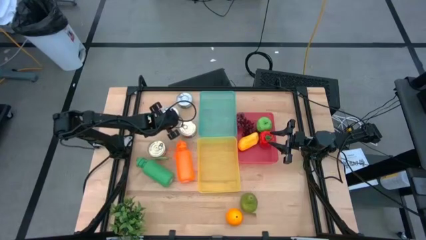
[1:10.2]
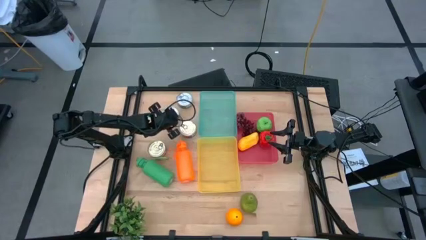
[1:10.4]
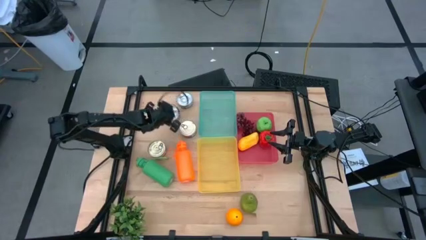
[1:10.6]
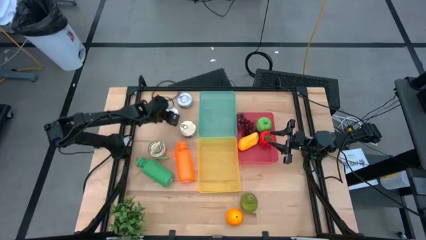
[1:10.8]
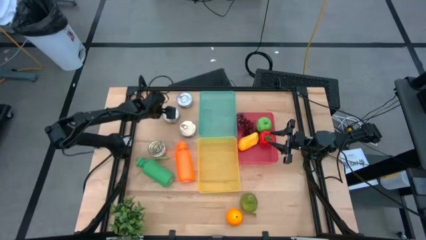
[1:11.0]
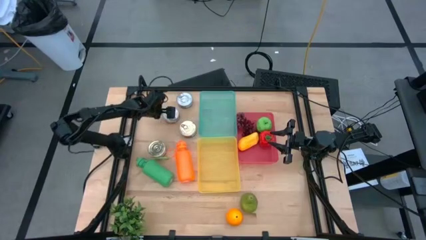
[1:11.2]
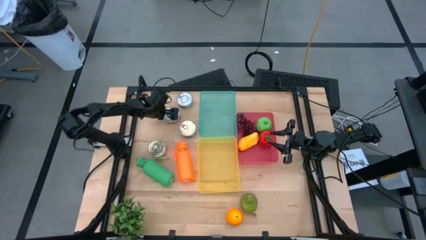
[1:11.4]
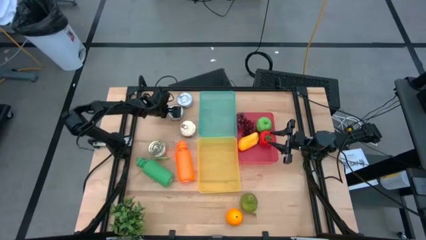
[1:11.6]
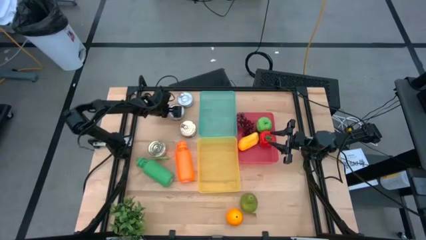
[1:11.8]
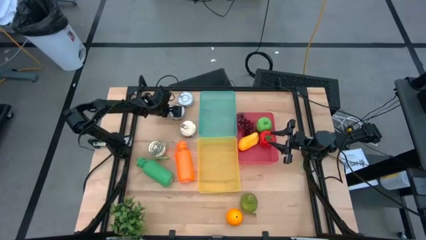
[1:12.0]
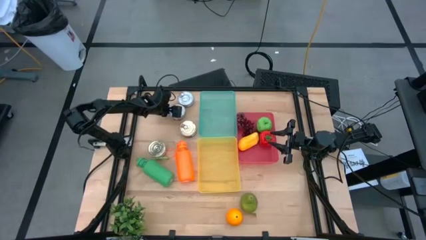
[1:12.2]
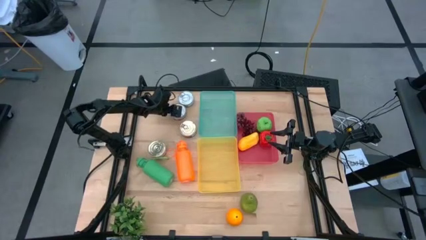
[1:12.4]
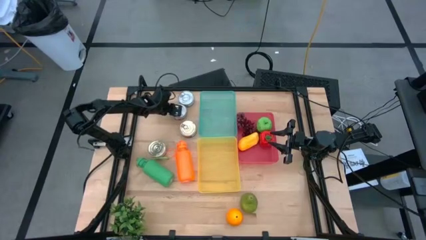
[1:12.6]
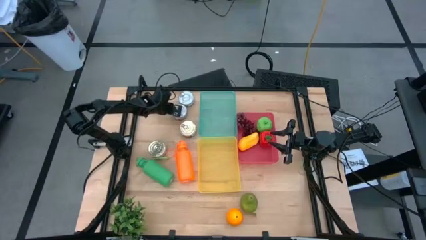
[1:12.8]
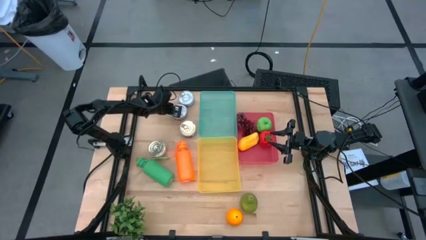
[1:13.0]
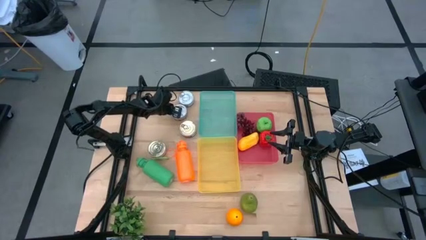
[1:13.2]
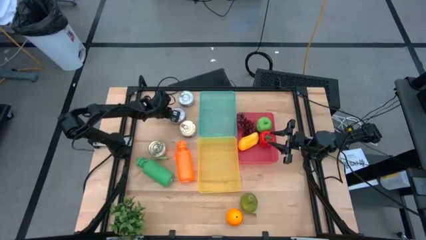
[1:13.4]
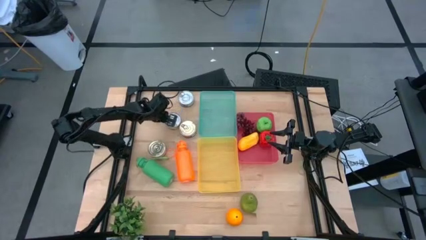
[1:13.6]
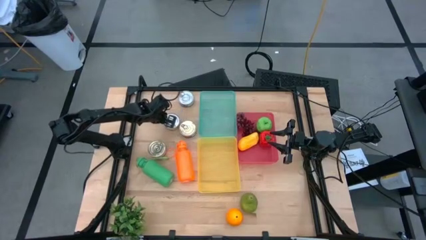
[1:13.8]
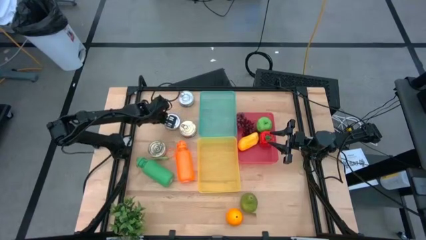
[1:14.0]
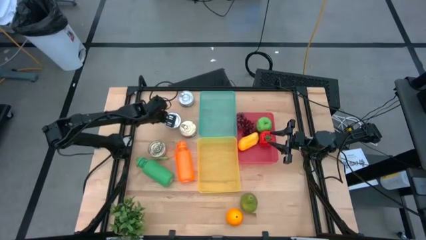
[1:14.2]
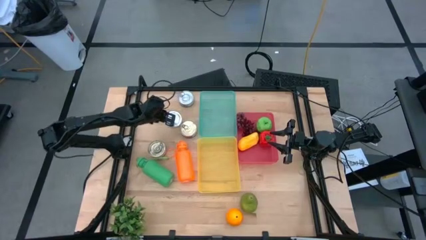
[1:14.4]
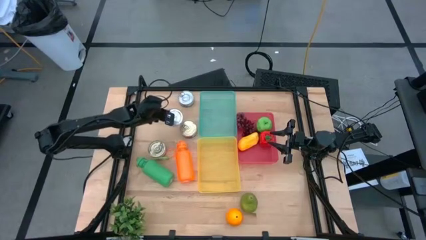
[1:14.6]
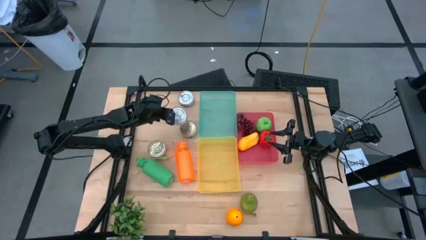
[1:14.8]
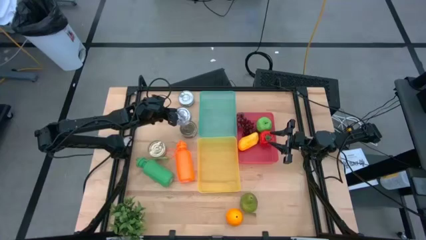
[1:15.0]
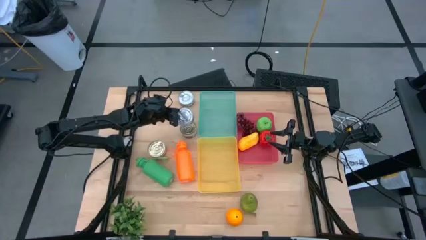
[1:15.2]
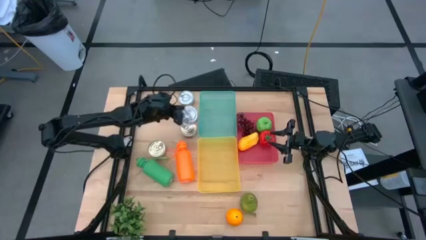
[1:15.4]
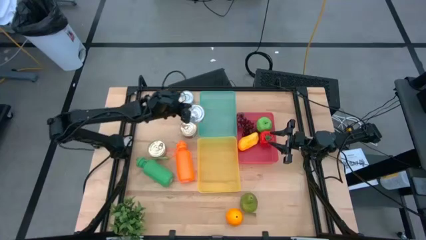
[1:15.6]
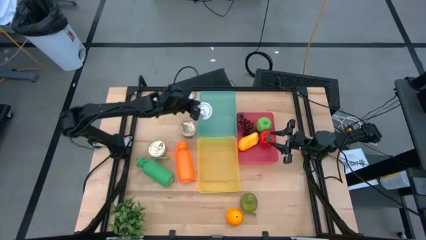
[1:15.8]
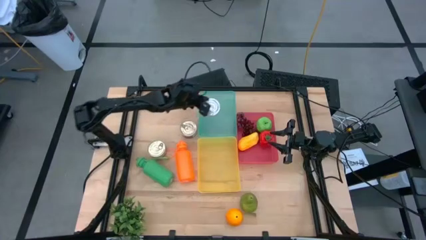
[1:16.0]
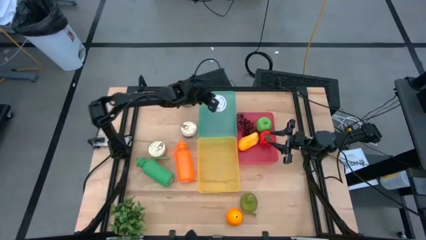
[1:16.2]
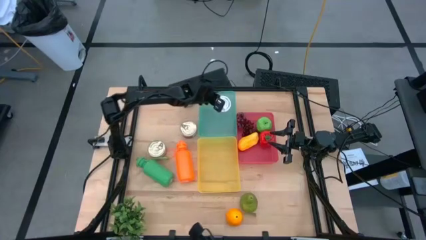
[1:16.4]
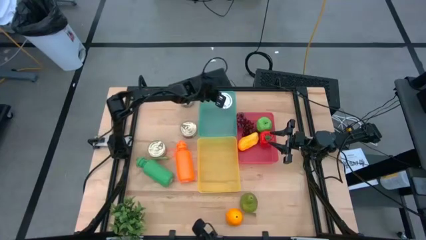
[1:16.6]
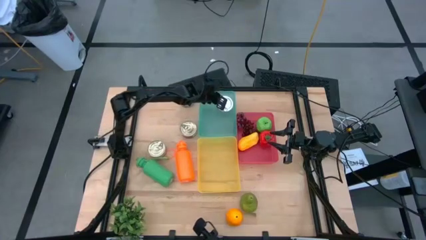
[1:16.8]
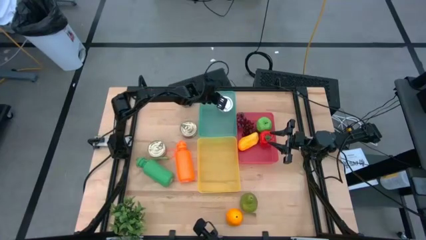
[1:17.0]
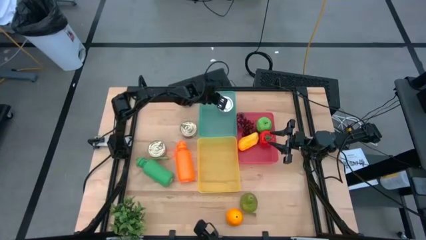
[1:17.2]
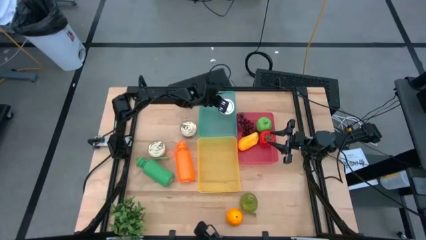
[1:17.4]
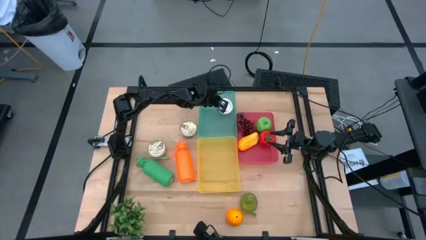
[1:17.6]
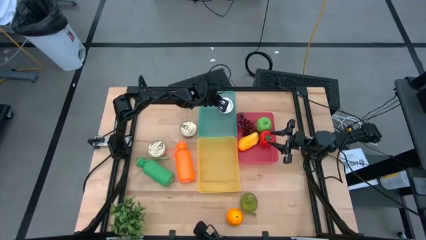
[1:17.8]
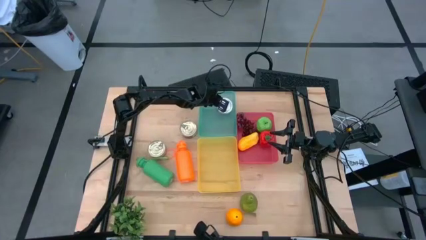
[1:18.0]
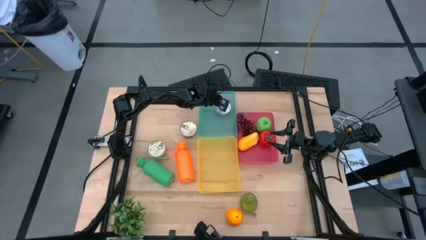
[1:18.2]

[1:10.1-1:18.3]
Task: Pick & Place Food Item
Put the left green tuna can into the light blue bin

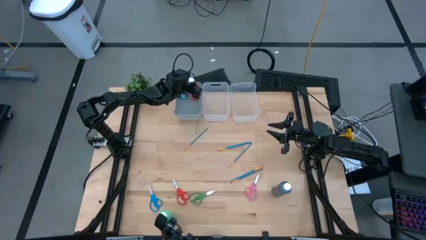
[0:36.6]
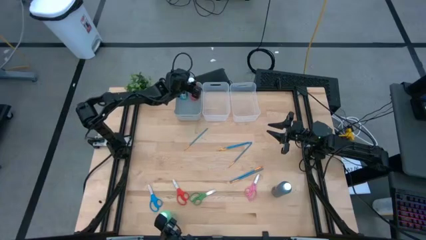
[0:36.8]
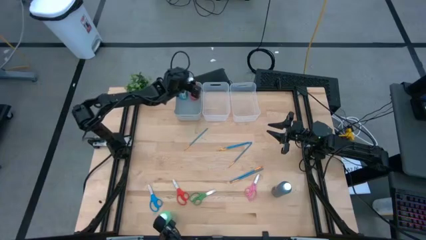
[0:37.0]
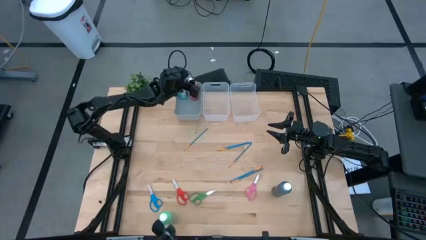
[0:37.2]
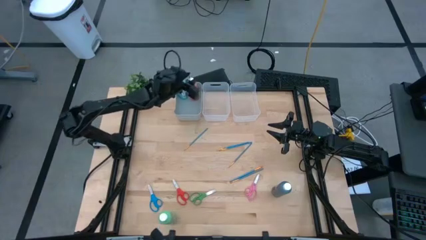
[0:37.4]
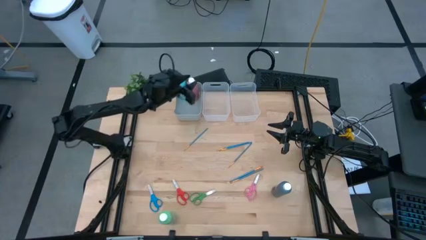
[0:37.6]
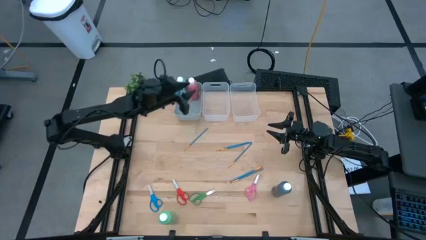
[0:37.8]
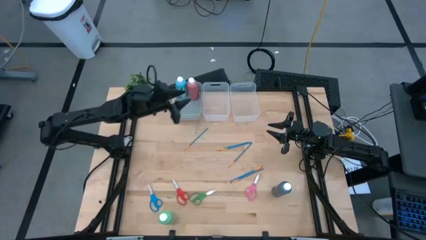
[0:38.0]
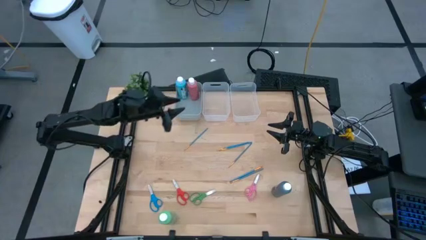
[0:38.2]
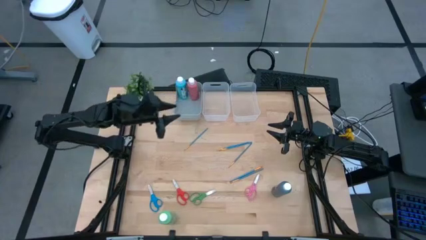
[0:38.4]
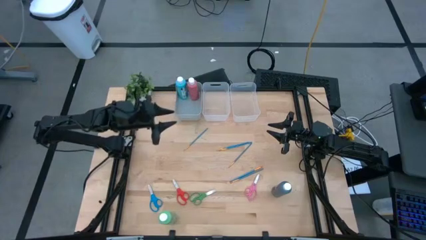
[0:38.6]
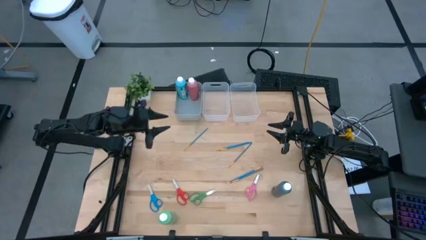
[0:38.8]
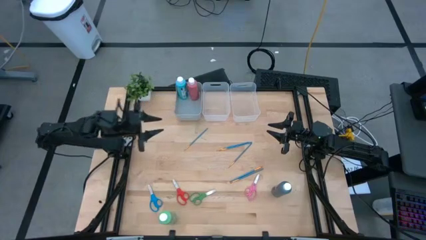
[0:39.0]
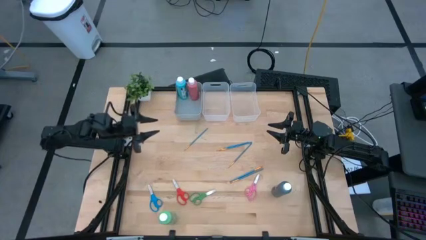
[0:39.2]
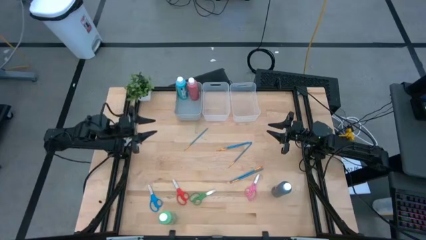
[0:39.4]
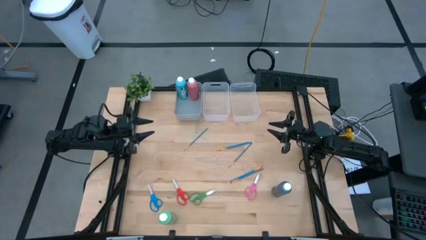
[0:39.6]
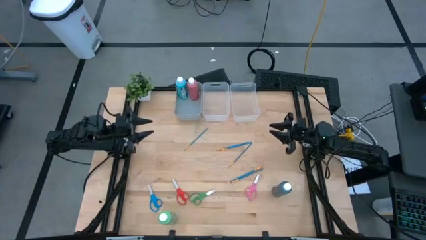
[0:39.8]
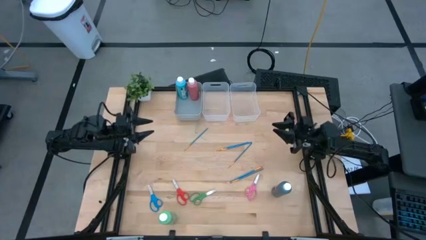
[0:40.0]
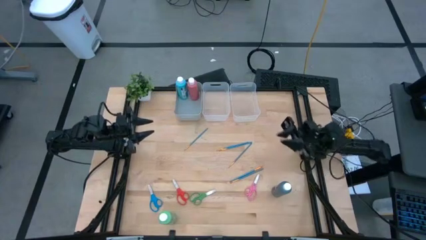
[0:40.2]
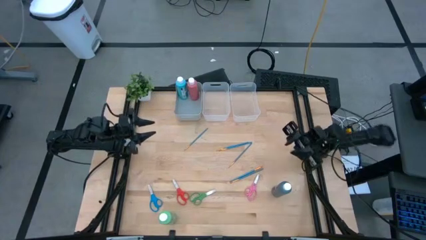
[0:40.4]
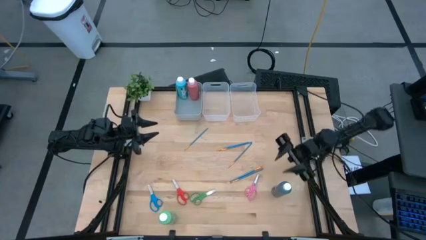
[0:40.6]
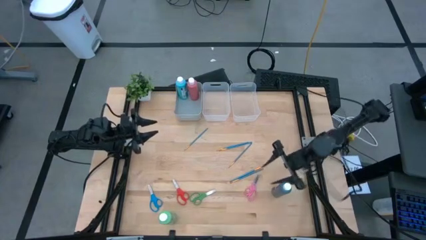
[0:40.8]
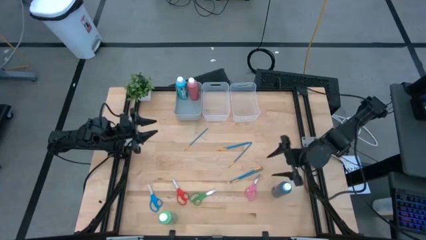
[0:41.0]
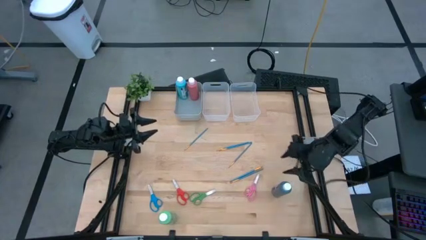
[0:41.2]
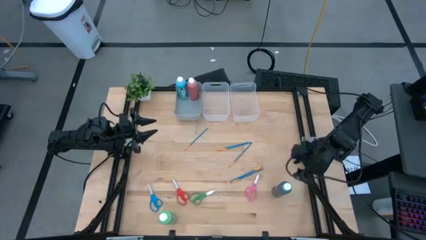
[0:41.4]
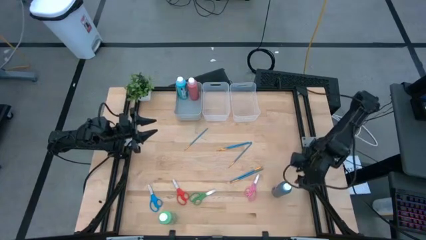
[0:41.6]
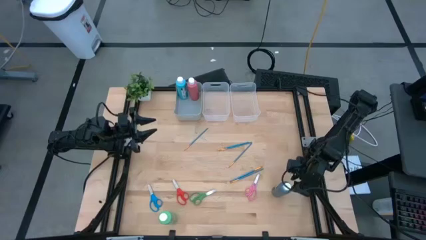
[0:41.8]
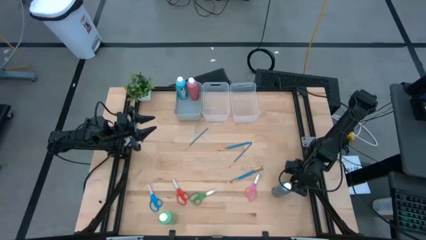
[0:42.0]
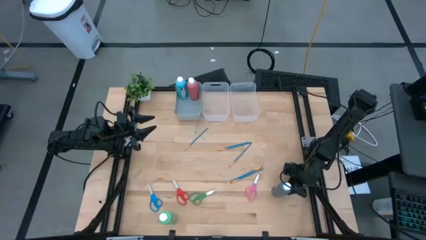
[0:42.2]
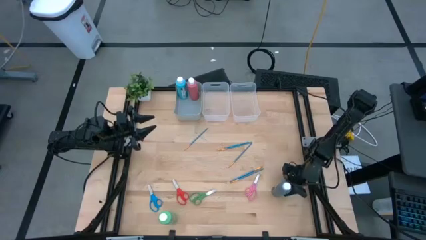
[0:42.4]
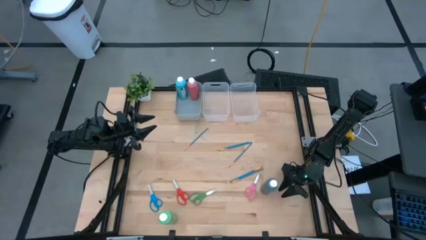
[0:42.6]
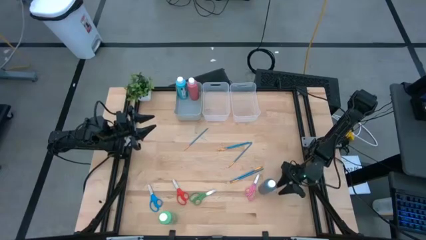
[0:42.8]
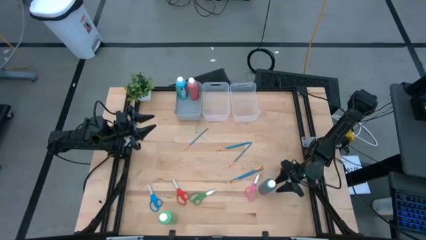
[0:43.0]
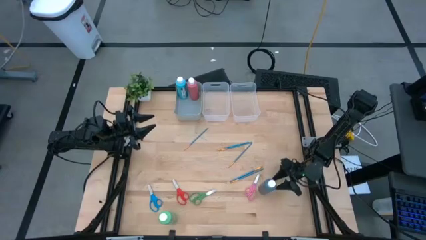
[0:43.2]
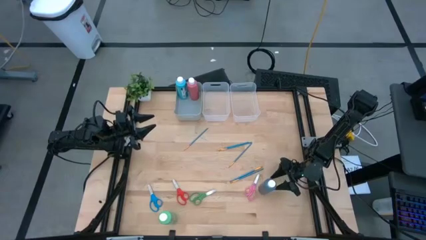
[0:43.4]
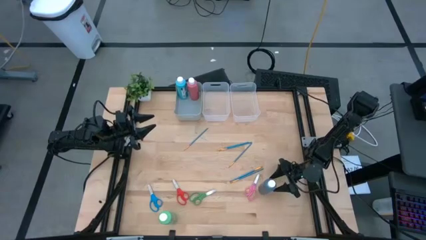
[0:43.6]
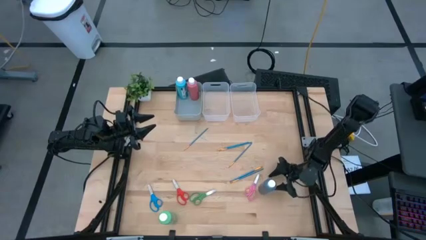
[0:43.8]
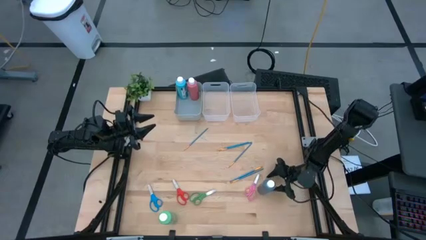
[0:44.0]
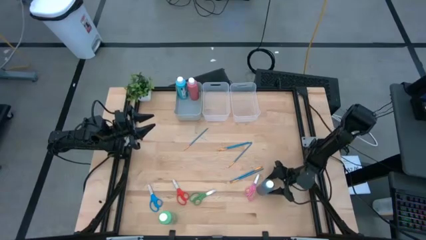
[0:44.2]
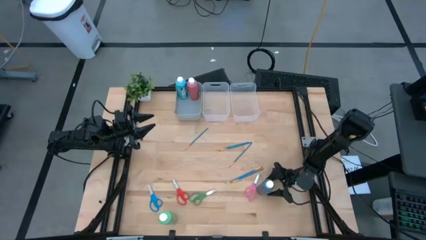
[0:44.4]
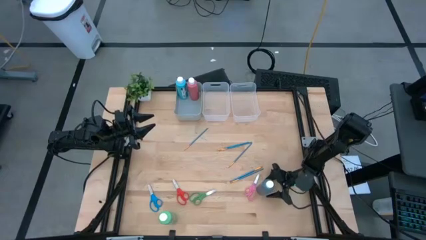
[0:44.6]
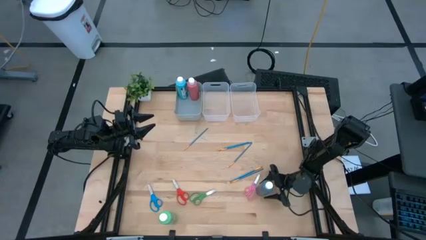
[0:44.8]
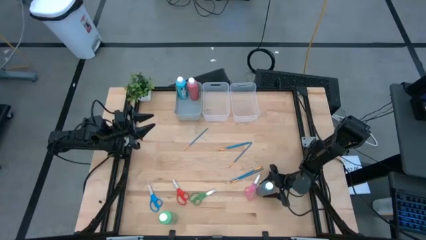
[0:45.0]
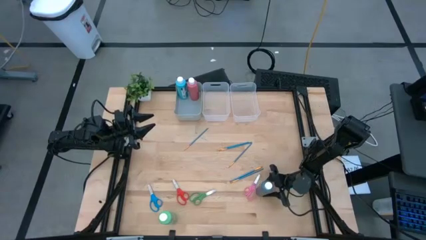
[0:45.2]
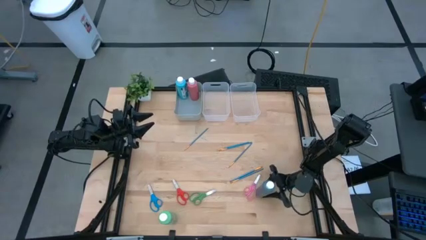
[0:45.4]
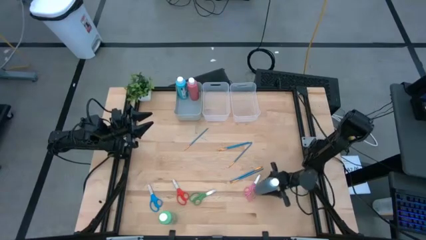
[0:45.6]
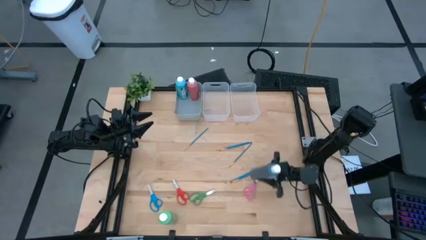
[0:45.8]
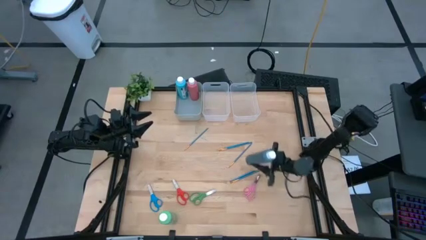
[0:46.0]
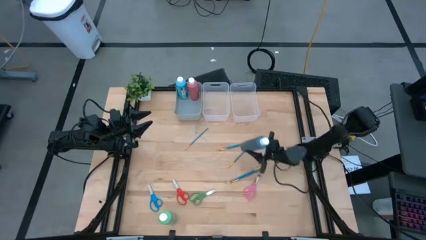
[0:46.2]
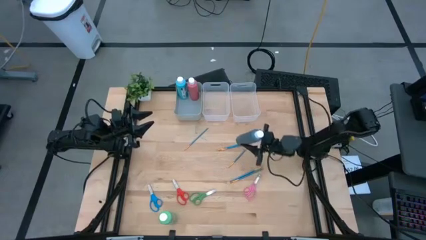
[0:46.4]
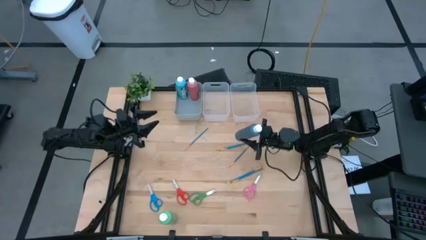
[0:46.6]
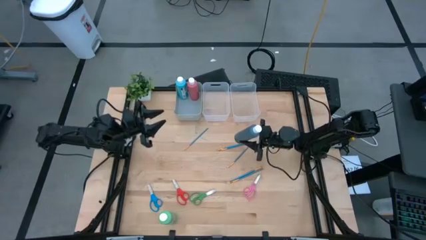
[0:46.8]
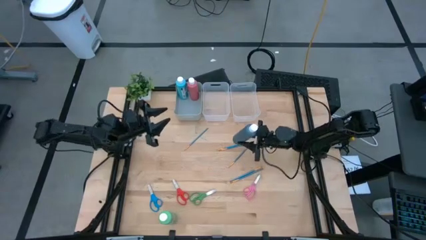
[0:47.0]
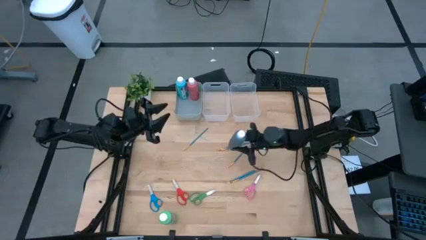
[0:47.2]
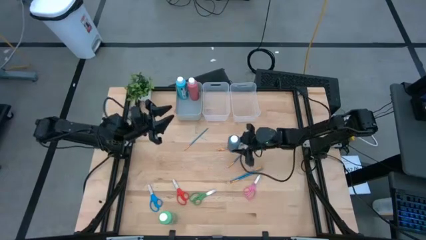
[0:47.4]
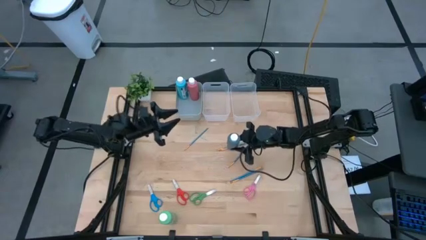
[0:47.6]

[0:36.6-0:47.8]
Task: Pick & Place Paint Supplies
Put the black paint bottles into the gray bin
